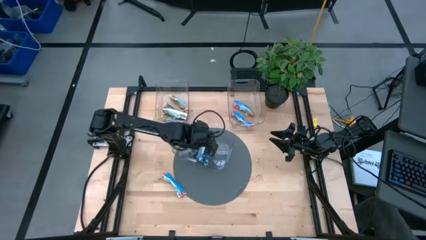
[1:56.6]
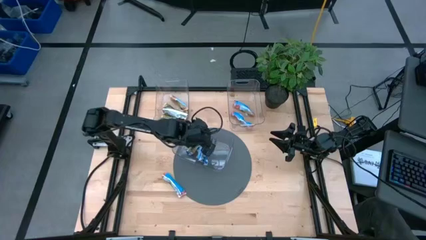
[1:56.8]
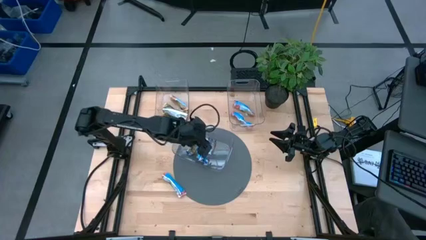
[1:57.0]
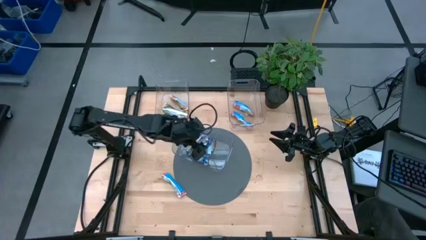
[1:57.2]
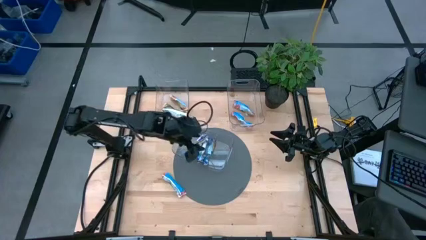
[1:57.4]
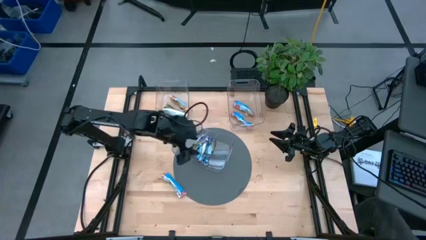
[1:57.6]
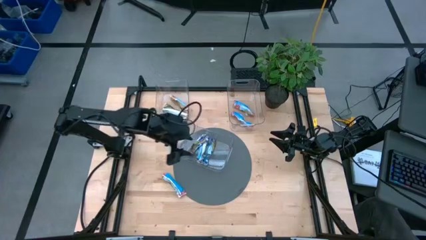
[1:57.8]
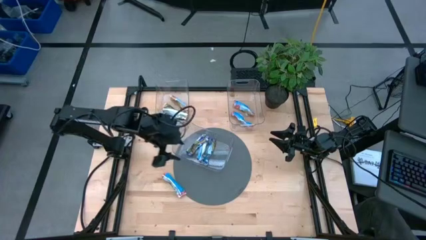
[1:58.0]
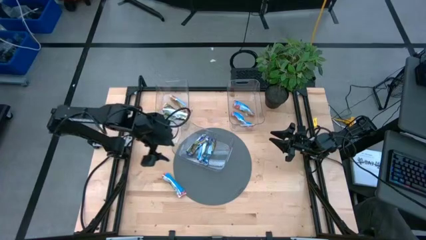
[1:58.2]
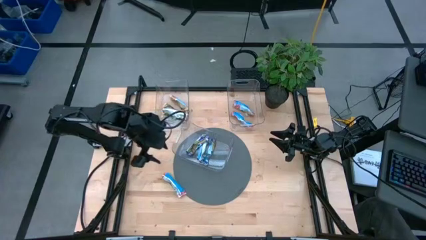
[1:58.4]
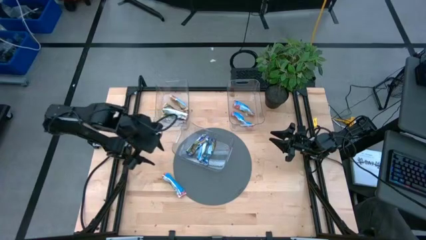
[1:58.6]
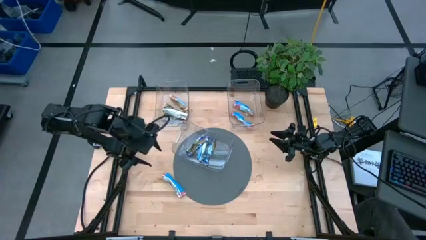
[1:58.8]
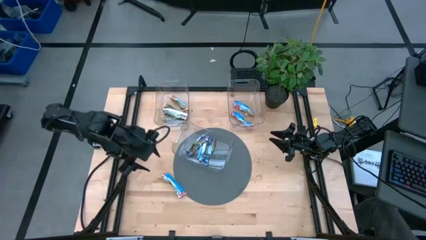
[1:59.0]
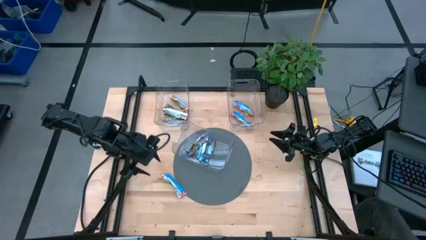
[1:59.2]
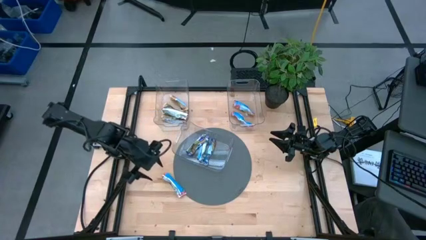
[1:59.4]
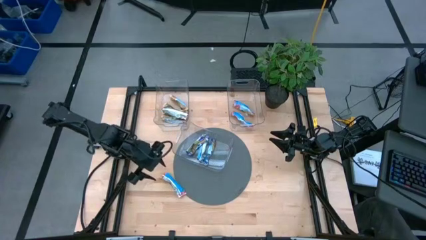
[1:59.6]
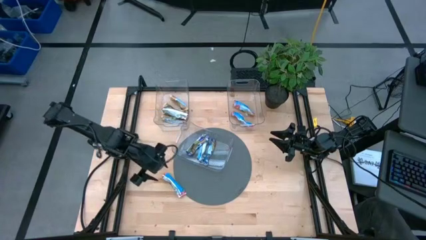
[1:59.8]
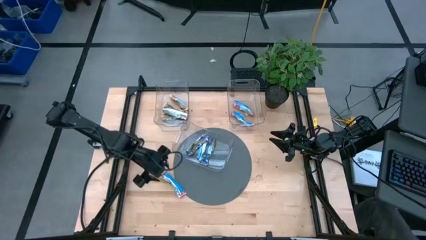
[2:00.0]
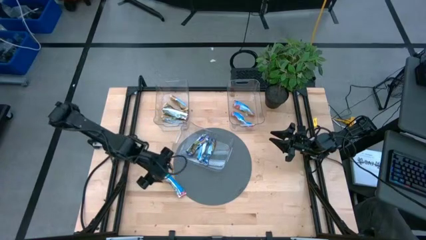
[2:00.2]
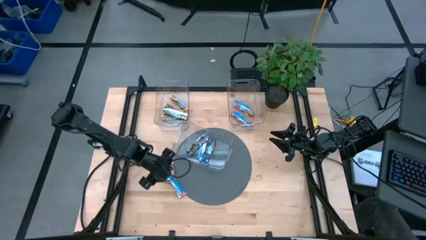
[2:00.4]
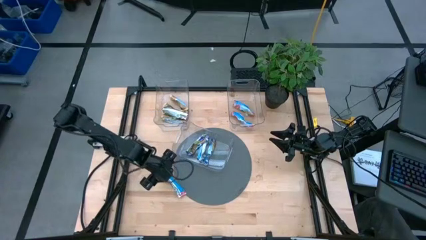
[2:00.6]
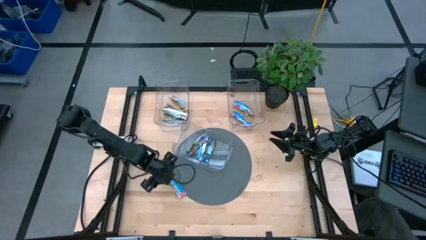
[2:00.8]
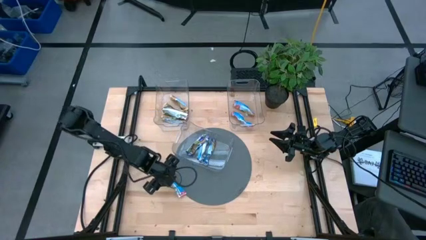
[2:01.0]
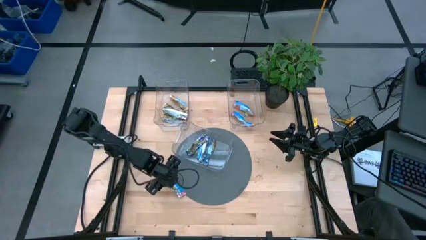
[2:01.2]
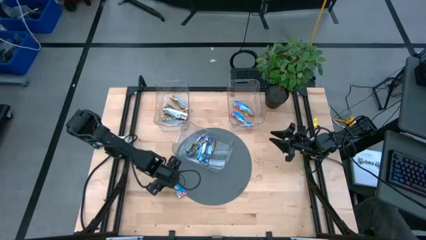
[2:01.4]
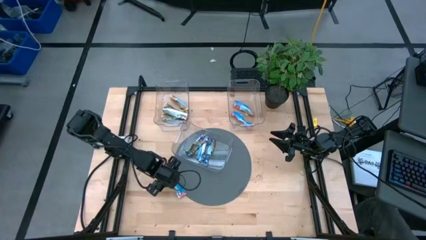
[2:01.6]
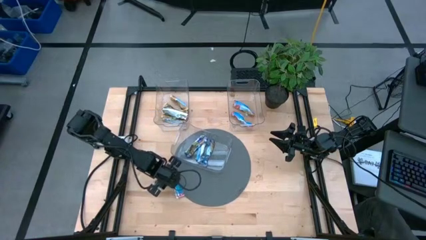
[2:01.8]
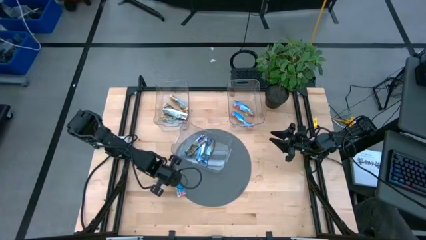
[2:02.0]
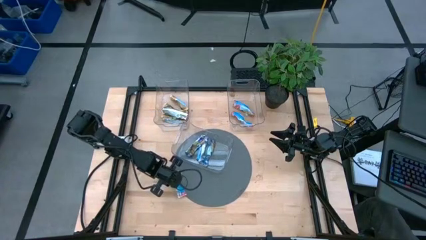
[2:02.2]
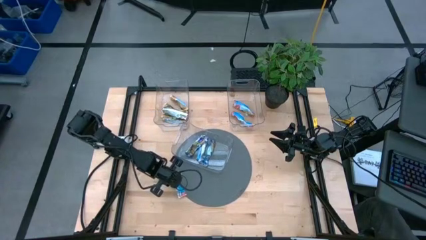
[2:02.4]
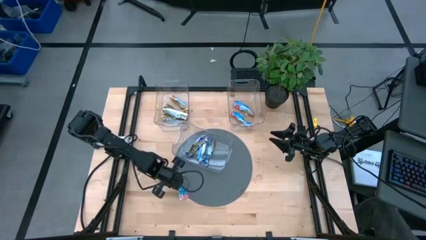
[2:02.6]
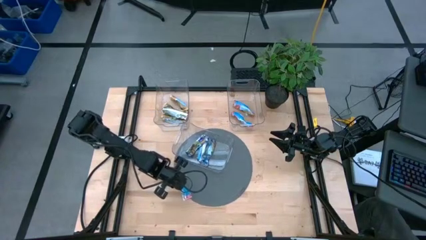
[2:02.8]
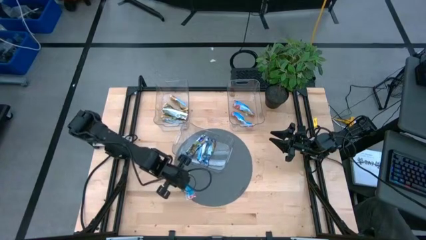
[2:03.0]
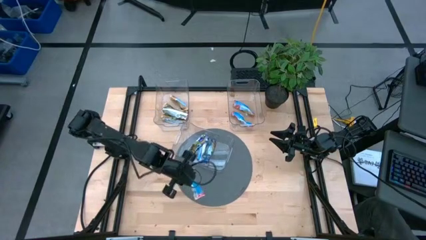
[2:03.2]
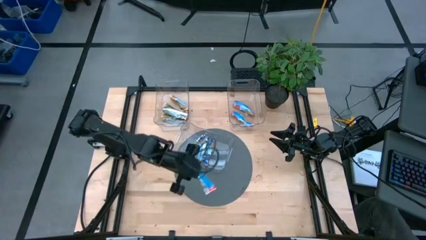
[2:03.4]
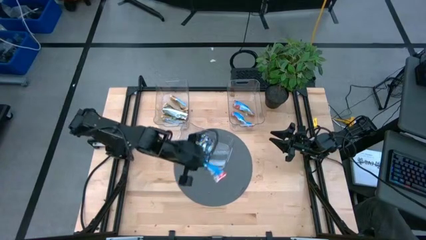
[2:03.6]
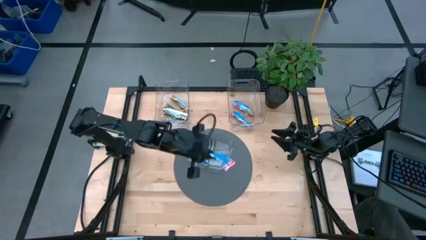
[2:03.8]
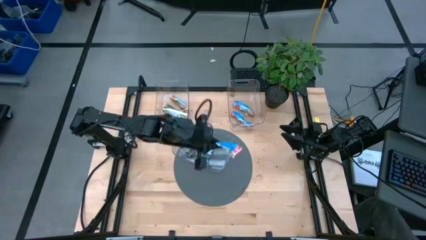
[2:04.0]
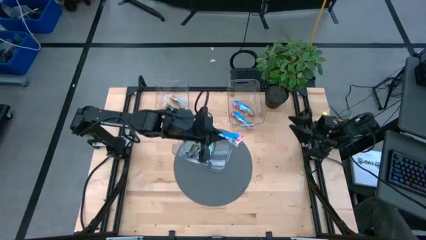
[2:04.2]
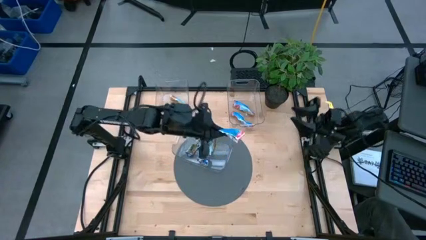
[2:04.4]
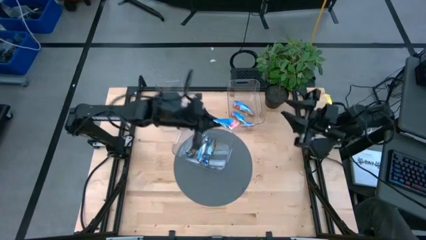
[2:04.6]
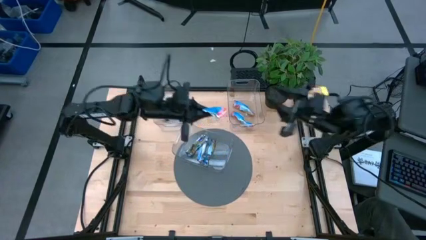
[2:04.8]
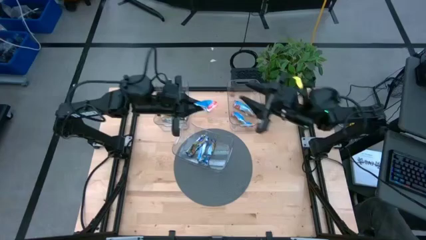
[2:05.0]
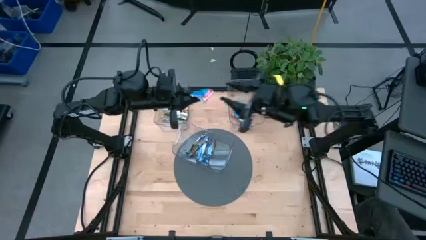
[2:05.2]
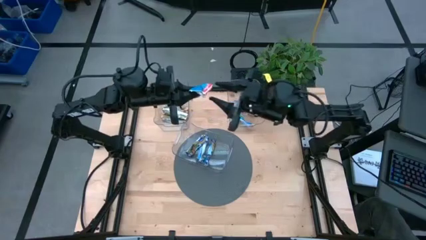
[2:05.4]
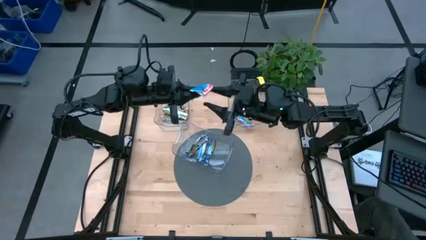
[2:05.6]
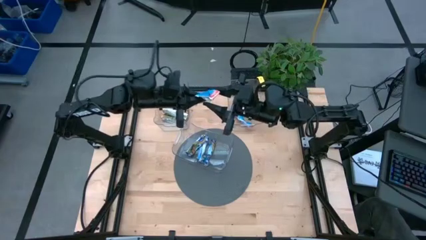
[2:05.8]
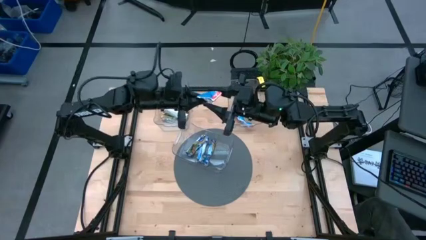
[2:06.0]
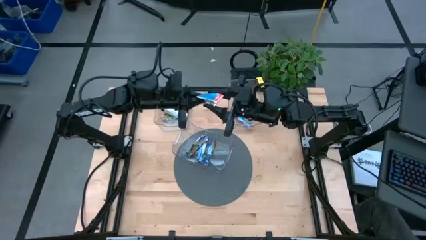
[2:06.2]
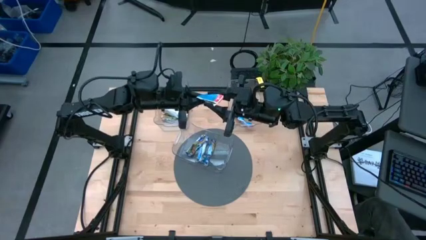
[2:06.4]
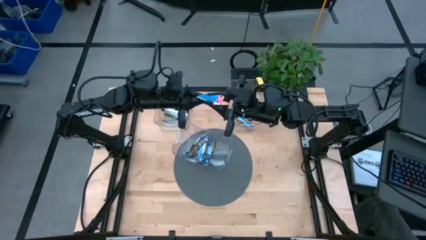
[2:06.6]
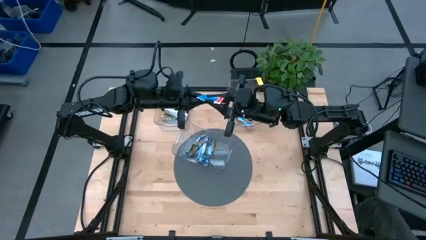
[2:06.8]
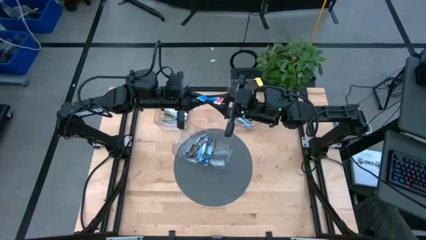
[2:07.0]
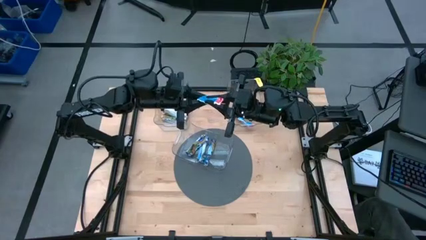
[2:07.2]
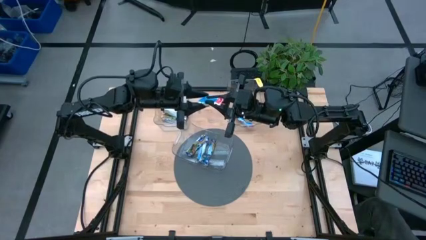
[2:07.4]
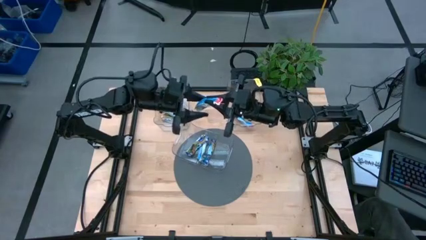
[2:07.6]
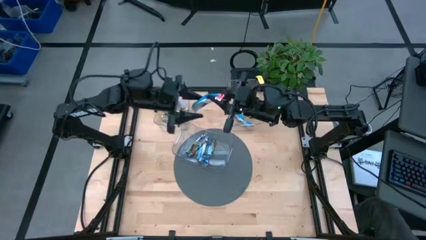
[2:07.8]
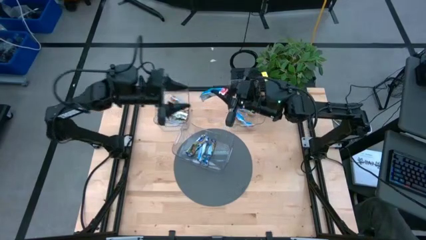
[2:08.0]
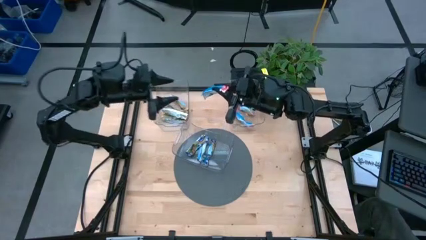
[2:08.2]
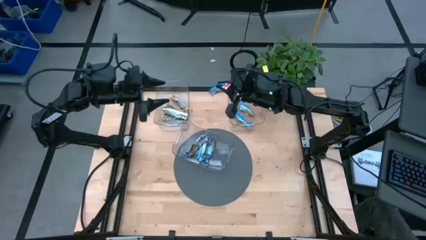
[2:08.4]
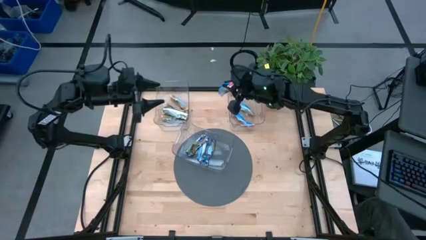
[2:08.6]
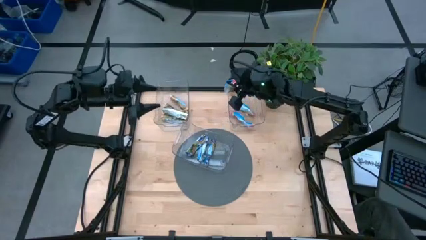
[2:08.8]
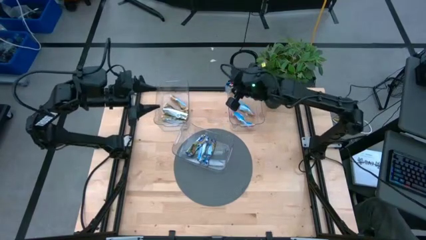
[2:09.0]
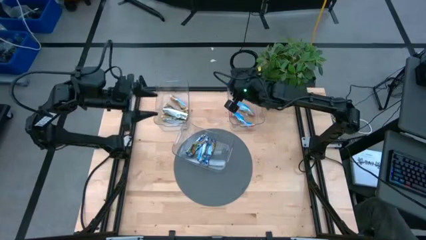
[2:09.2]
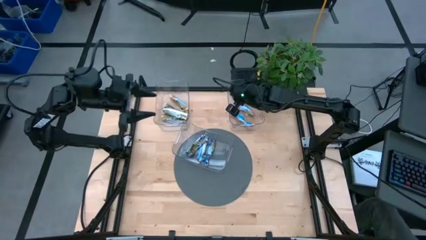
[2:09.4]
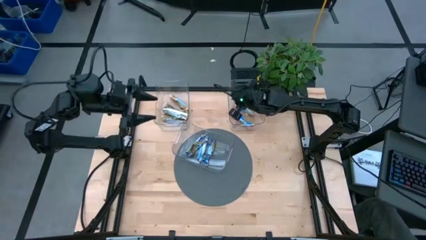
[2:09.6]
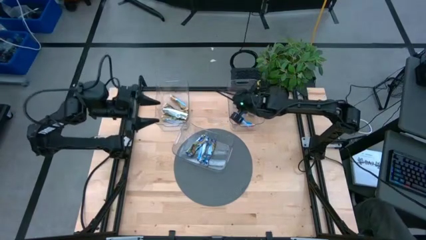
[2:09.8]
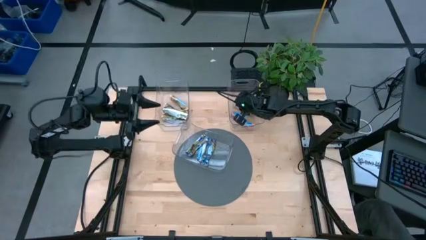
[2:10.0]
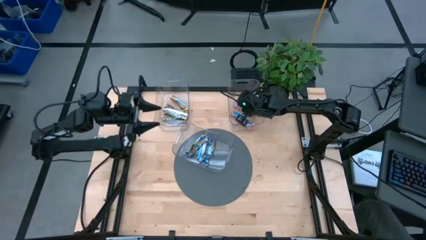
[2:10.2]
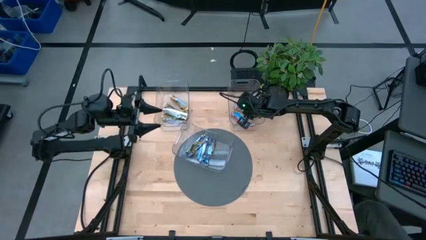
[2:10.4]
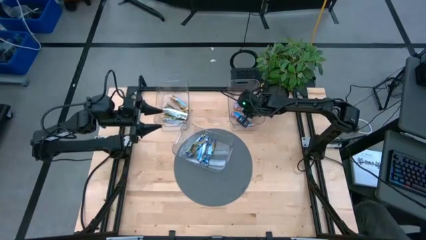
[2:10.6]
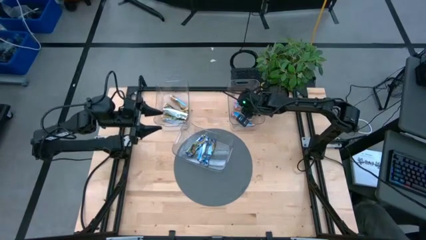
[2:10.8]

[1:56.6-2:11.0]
Task: Pick and place Granola Bars by type
Put the red granola bar into the top right transparent bin

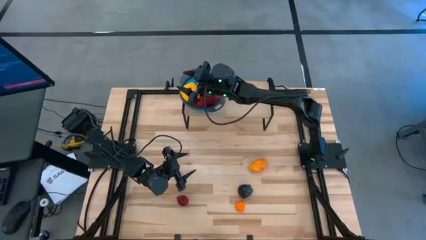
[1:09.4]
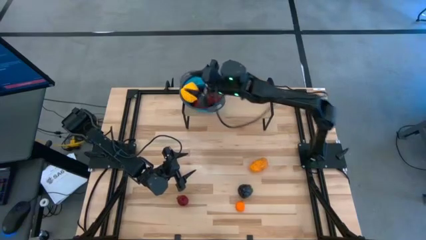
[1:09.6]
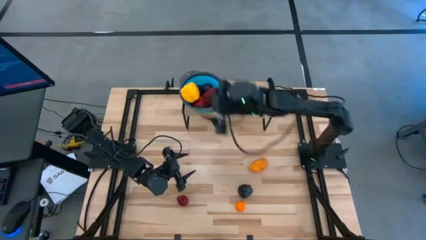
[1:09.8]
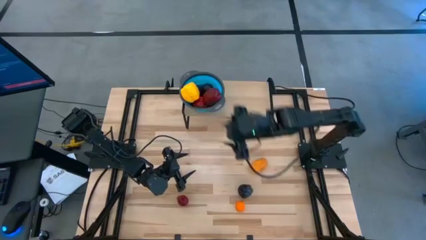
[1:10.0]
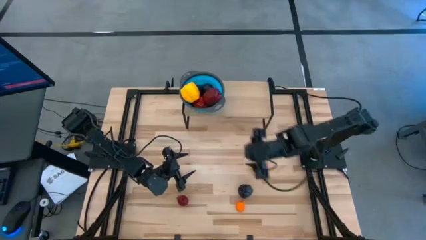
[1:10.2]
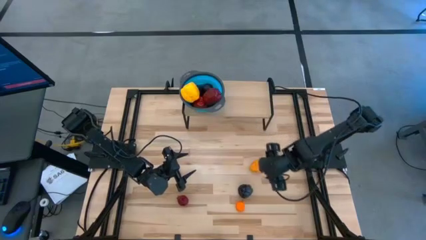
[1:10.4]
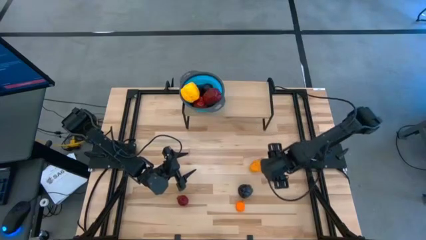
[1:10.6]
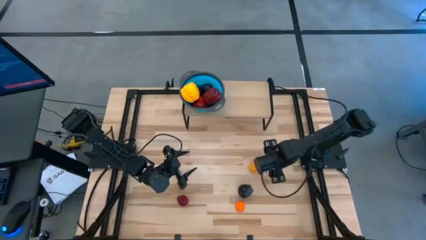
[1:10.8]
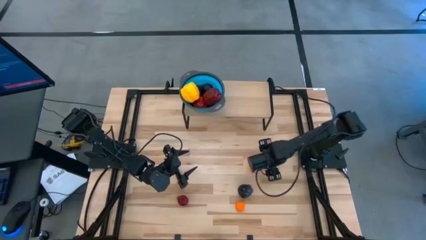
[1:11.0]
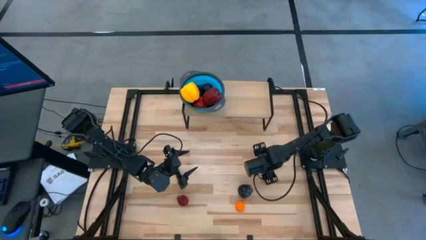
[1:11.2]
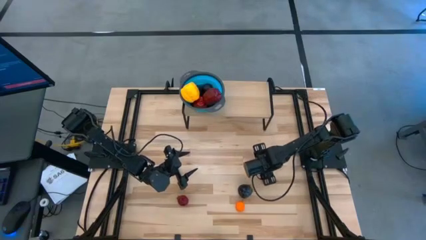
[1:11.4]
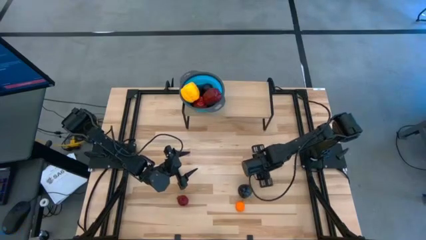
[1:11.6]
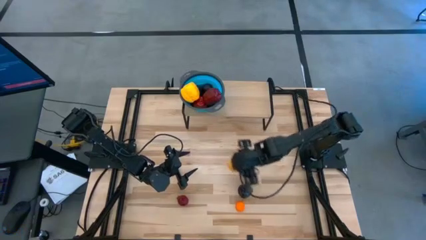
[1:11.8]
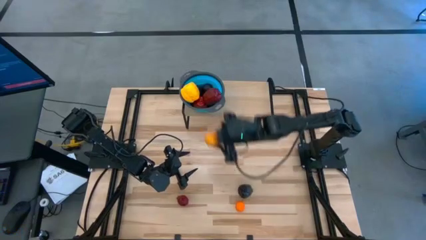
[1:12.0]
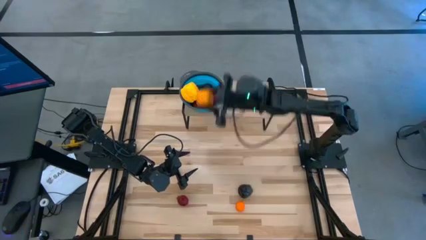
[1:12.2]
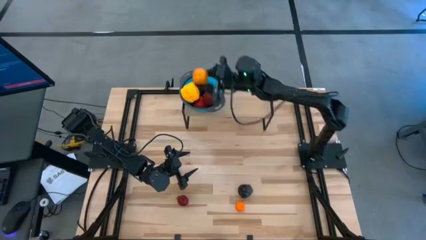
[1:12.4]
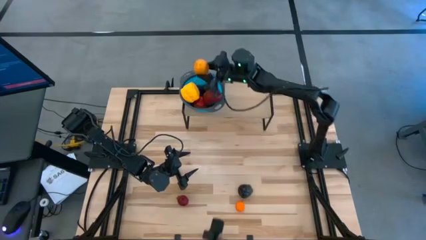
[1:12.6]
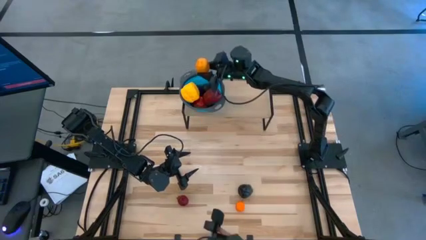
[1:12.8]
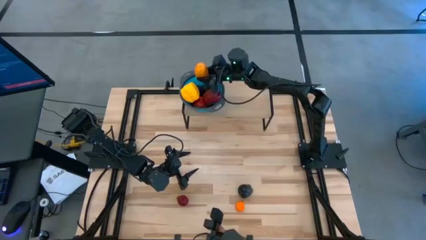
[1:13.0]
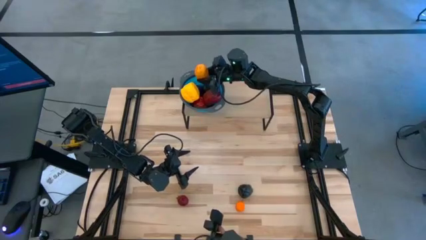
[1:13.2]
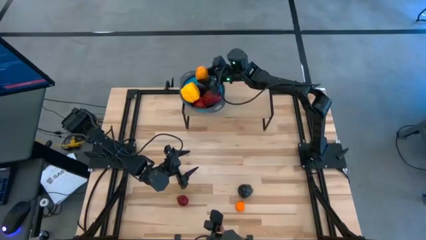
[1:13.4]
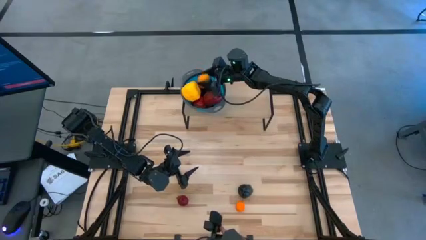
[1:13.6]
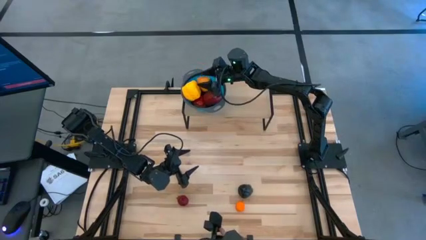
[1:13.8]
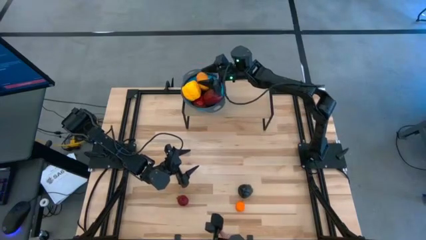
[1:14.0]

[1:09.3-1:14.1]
Task: Pick & Place Fruit
Put the yellow mango into the blue strainer bowl on the shelf
